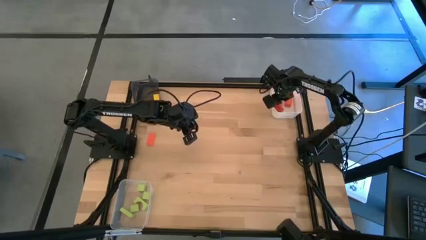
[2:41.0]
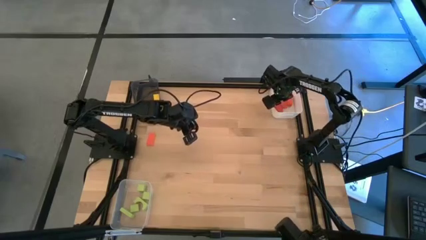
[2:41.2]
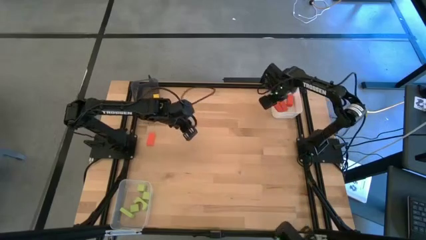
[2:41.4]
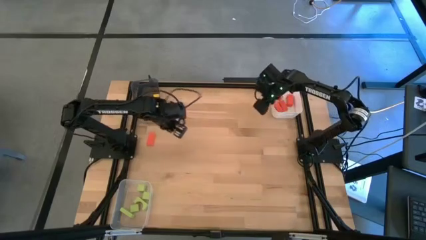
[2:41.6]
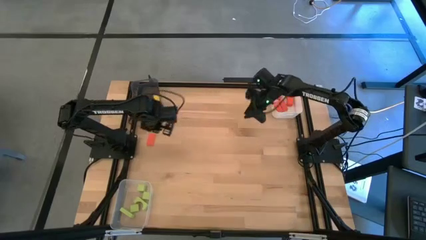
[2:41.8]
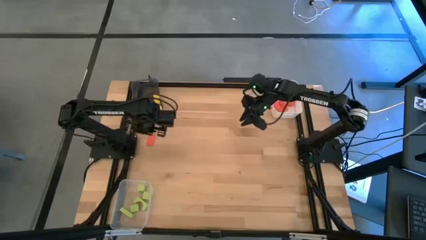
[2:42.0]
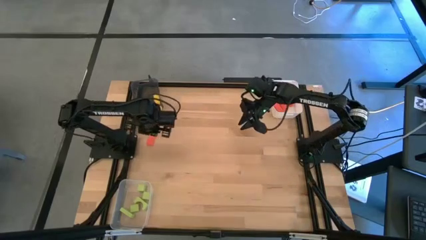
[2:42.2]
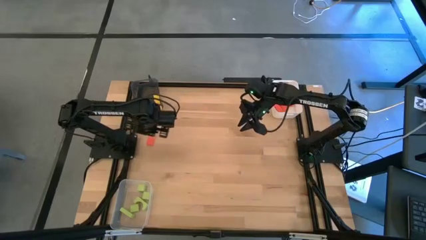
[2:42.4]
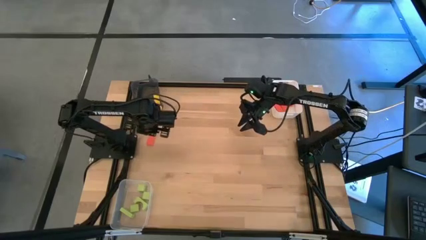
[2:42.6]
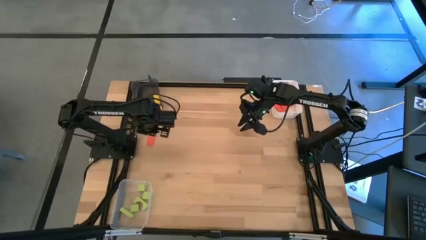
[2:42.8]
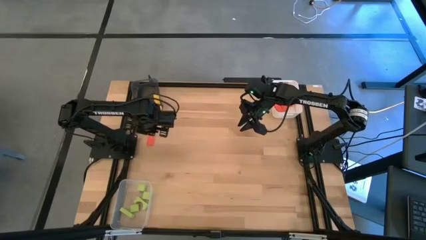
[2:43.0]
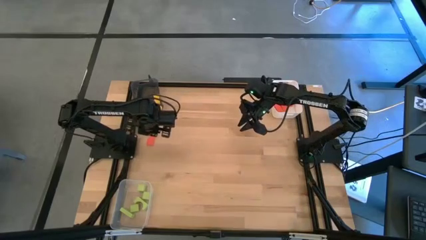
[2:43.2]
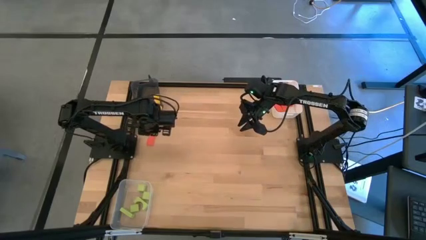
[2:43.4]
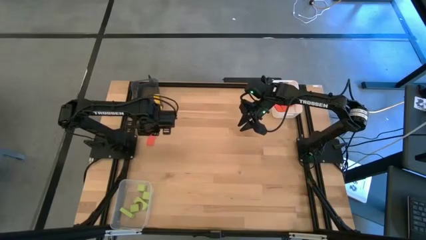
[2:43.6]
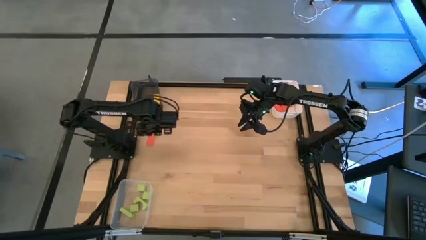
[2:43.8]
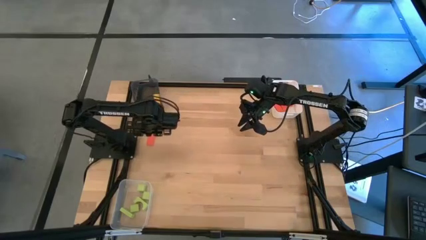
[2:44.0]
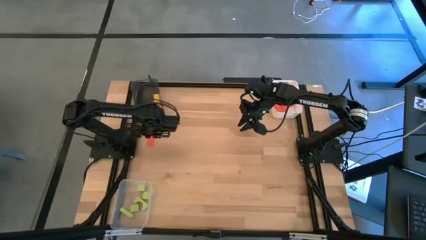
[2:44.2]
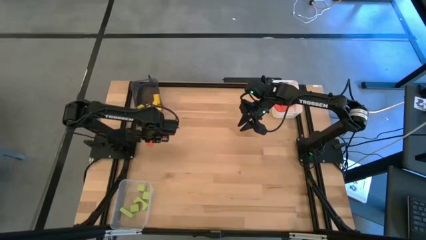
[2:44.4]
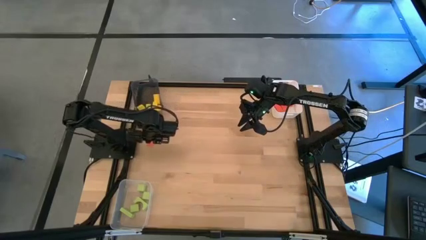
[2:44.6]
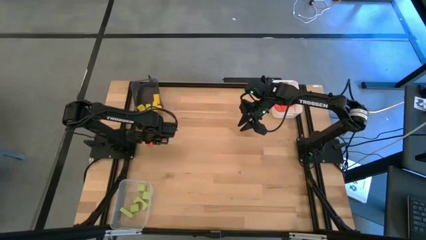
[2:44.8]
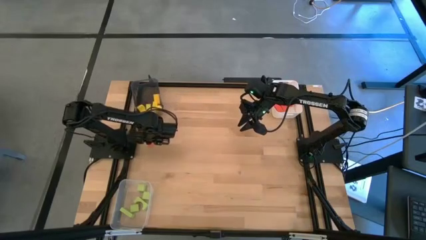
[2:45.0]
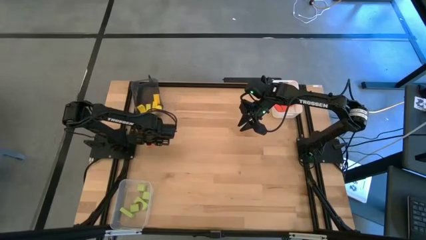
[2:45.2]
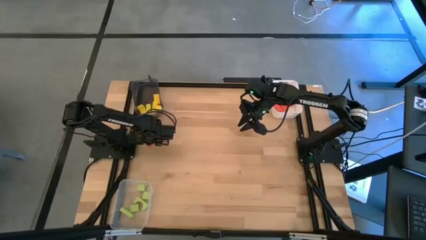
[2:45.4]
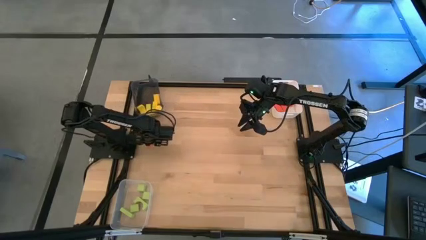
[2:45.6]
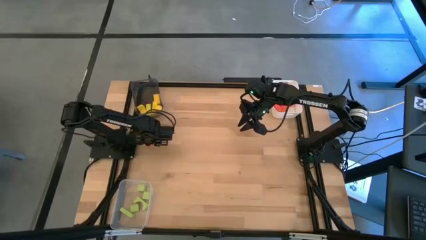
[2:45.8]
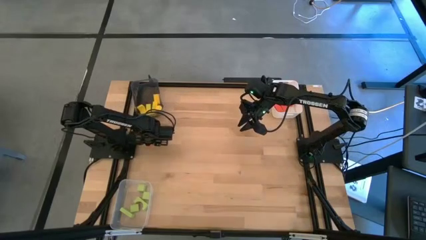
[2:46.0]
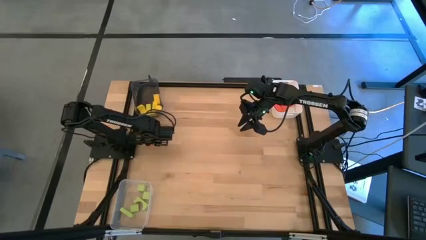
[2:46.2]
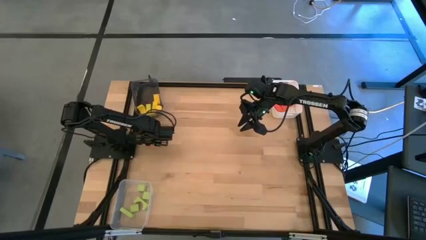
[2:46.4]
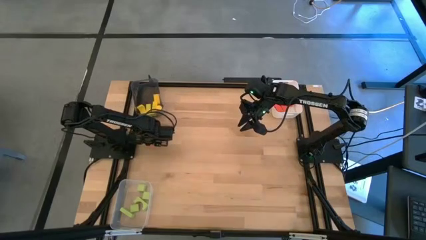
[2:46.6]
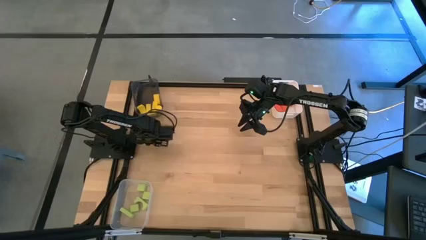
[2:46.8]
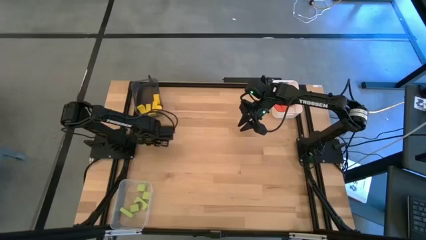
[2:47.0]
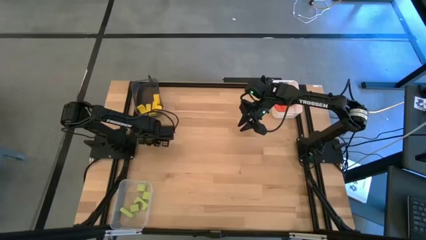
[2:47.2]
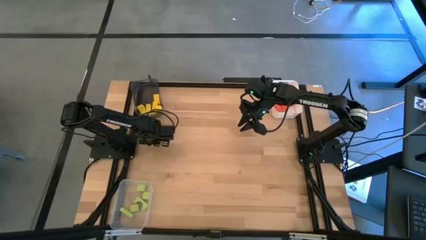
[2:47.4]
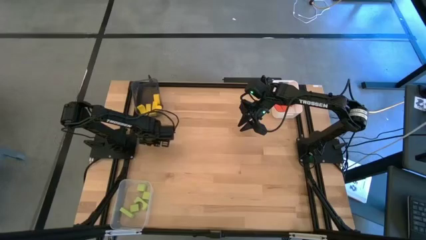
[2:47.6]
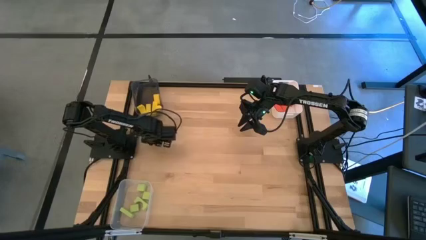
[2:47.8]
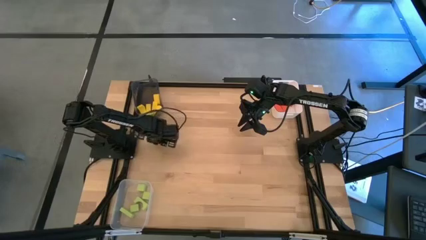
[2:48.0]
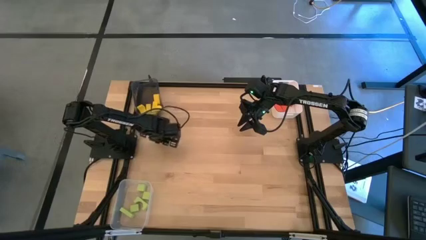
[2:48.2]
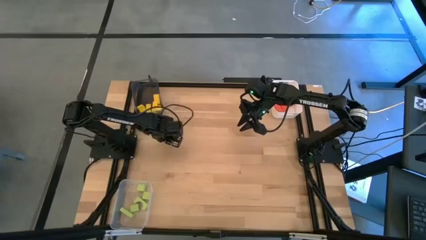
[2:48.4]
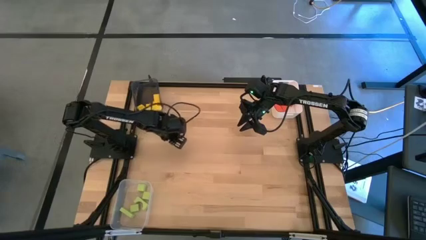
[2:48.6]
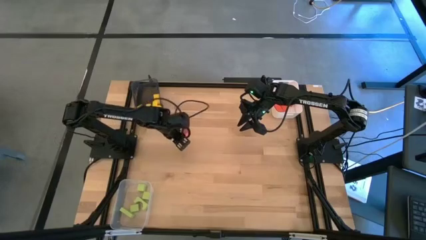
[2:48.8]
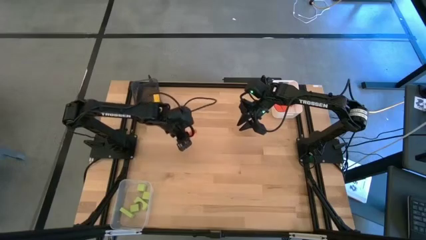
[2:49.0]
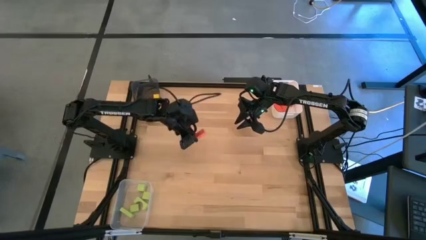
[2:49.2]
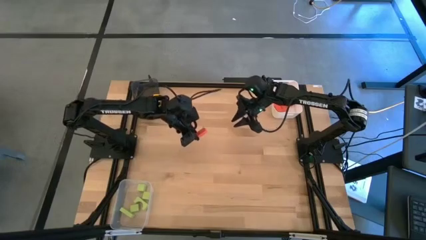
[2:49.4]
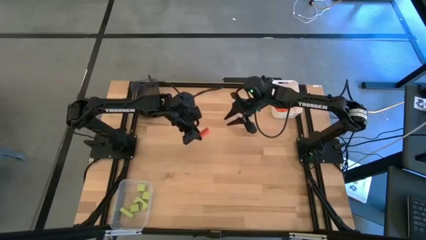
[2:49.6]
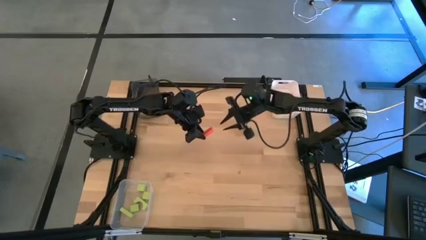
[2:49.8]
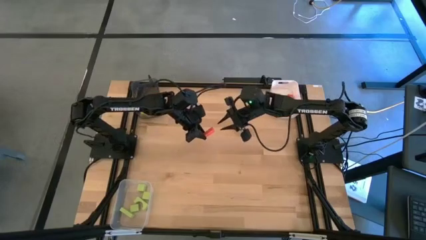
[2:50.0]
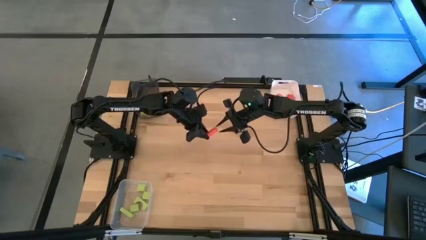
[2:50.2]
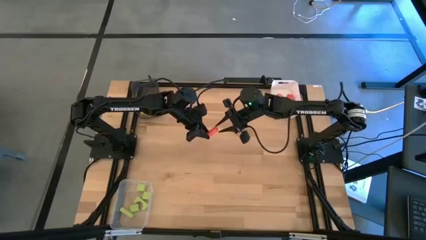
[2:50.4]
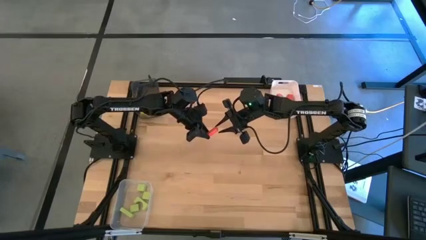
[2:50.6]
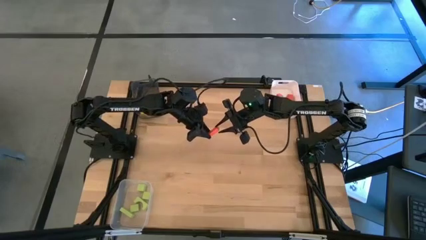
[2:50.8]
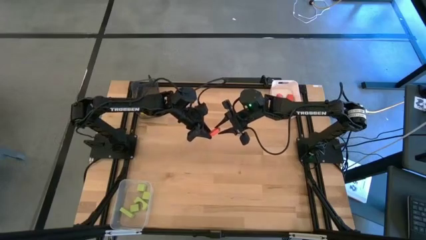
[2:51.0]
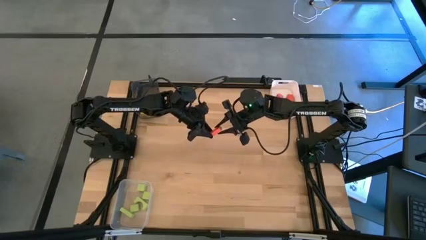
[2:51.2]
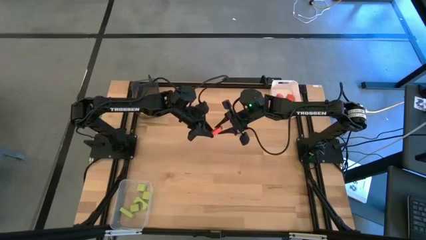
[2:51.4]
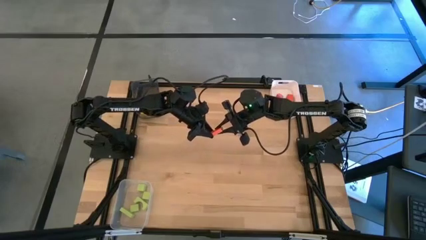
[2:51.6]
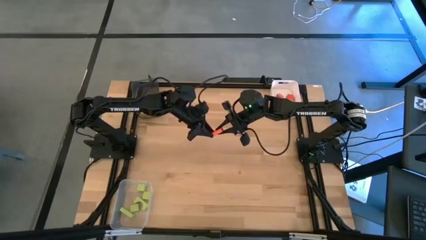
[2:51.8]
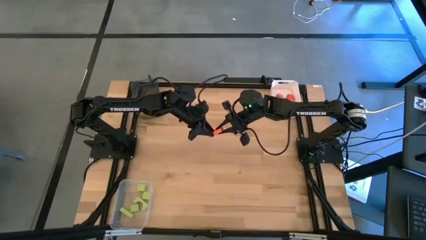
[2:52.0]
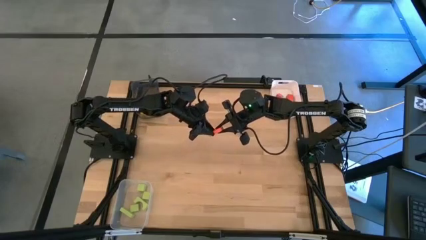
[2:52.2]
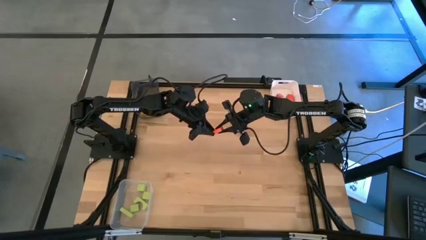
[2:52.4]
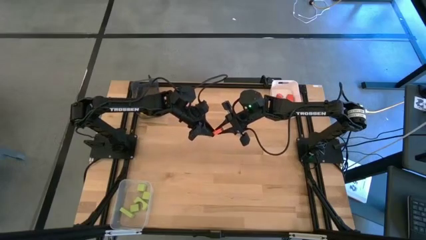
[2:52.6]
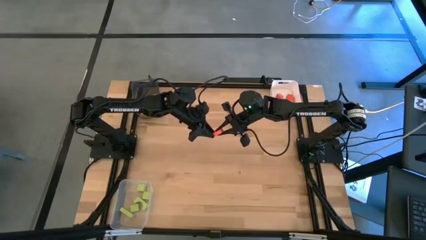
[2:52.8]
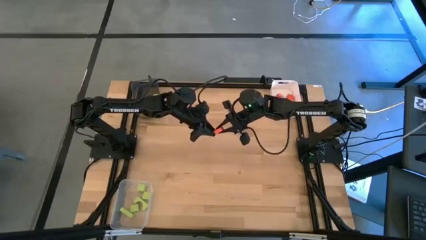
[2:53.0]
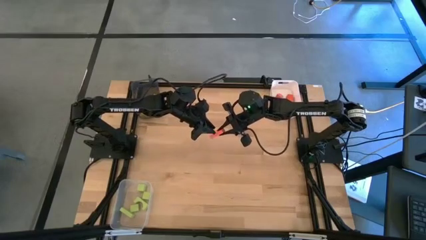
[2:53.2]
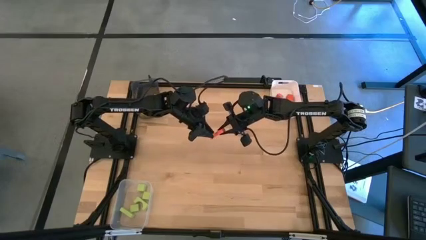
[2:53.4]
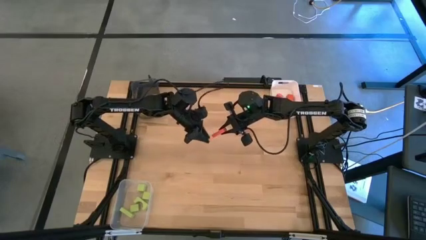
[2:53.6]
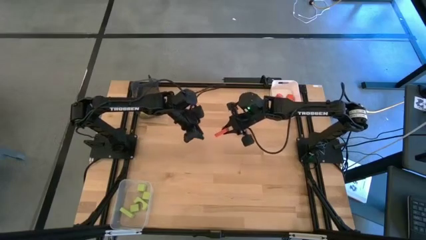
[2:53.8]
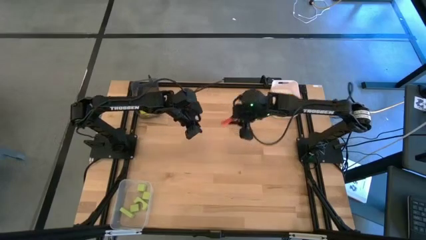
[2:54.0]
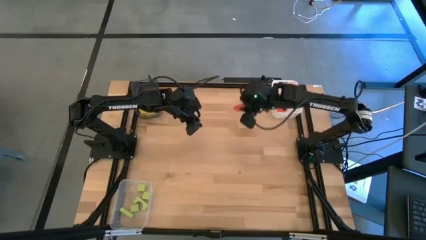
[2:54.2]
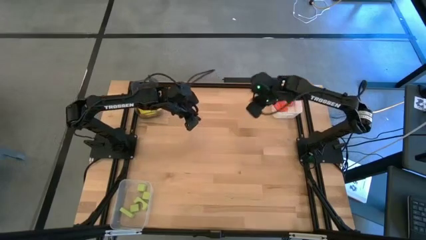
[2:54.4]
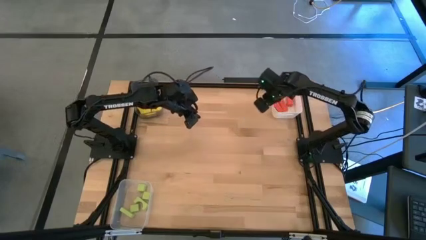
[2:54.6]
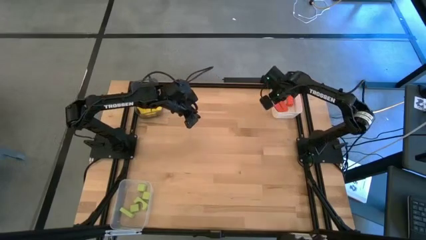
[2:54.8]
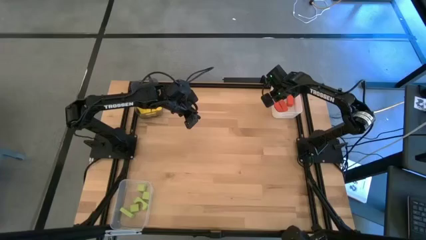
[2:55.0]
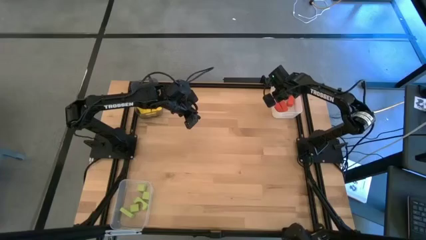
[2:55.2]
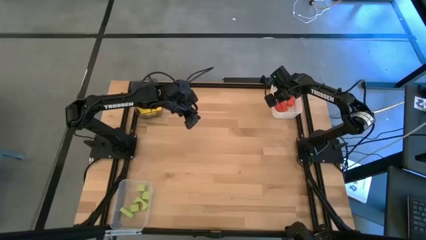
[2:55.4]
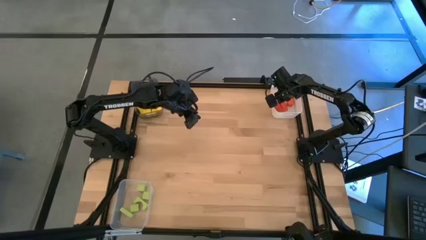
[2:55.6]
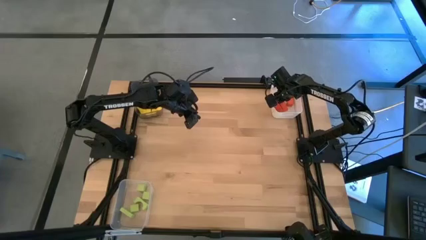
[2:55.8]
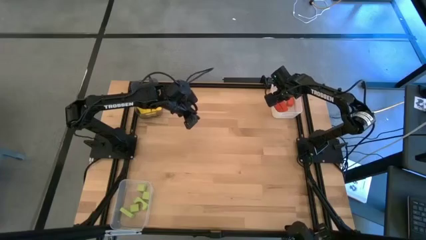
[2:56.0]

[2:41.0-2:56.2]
Task: Sort & place blocks by color
Put the orange block into the white bin

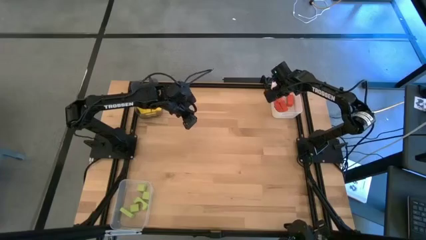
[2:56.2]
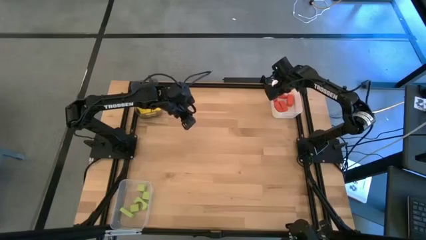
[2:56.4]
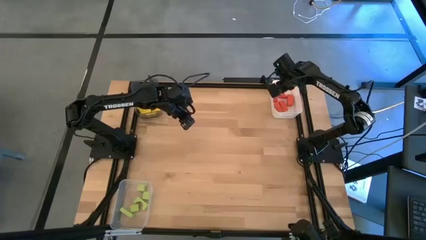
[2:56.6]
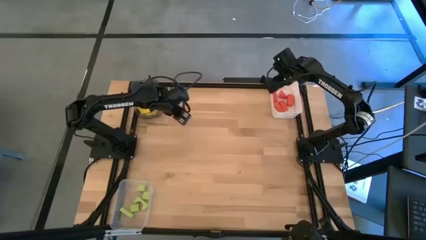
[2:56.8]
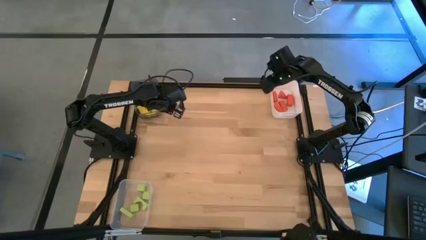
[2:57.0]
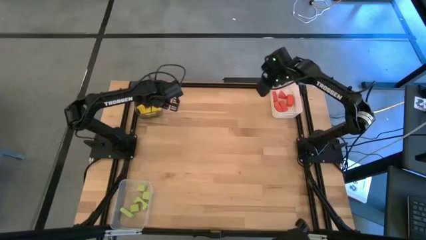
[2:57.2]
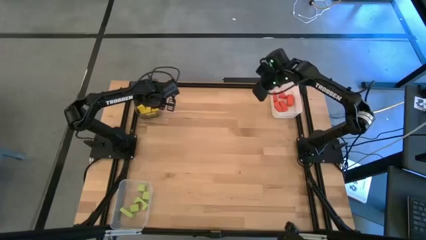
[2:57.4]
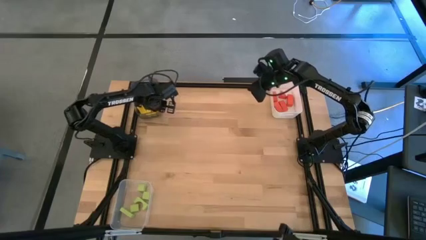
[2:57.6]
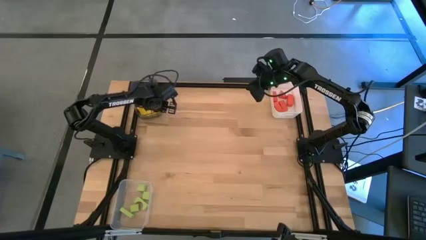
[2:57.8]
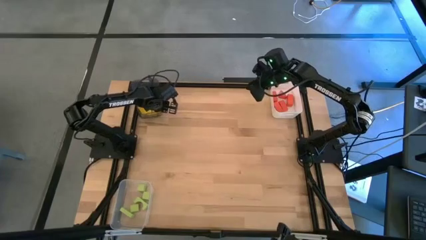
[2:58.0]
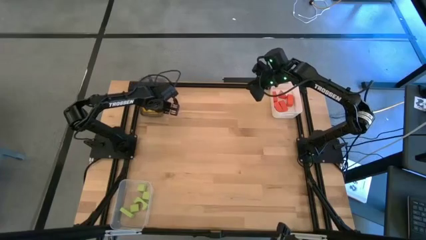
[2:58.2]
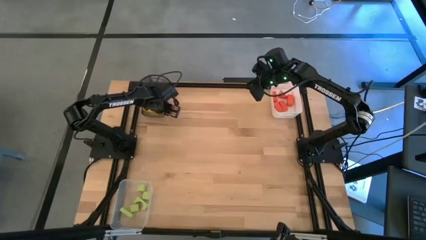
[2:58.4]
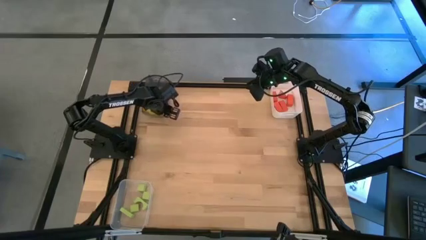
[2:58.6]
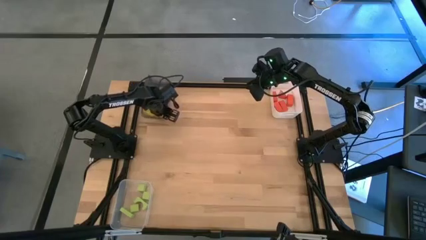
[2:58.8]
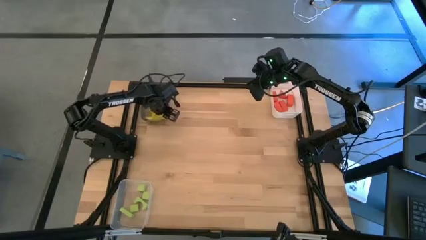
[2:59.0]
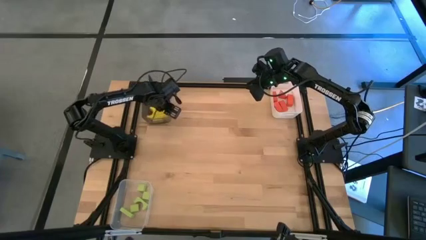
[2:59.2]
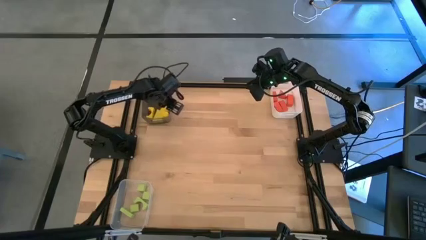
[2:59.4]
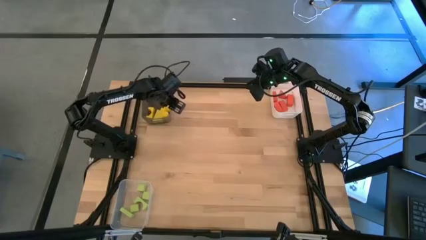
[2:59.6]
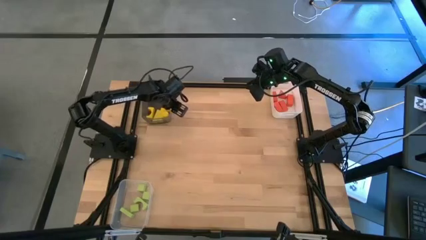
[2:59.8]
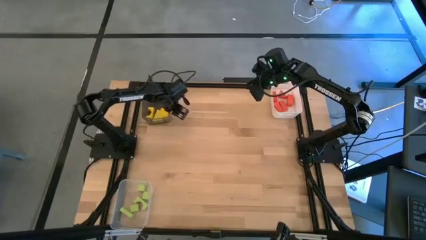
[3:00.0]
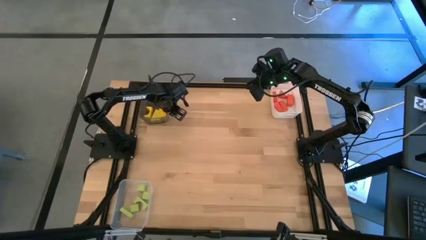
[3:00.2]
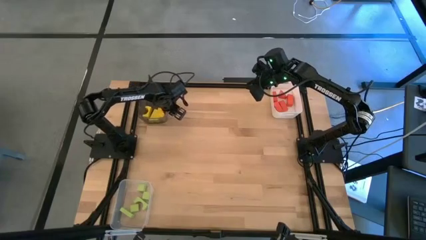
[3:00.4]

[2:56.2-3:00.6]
Adjust the black bin
